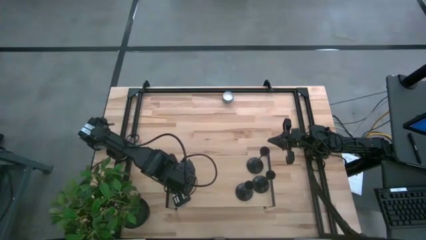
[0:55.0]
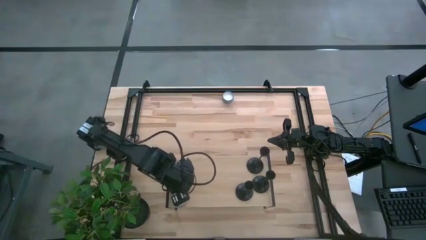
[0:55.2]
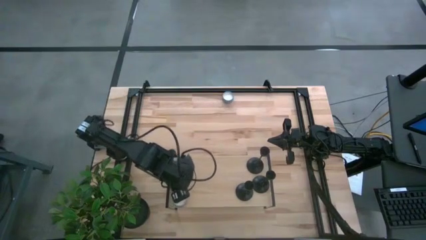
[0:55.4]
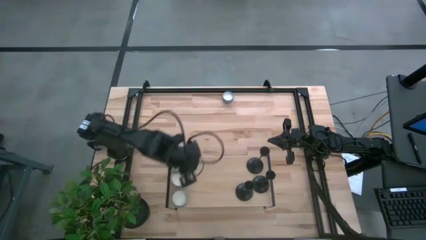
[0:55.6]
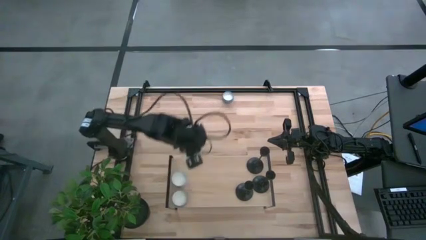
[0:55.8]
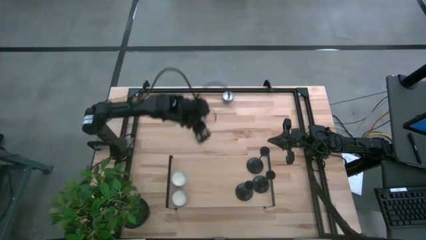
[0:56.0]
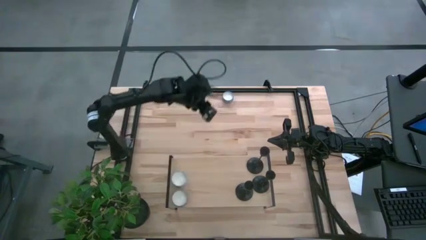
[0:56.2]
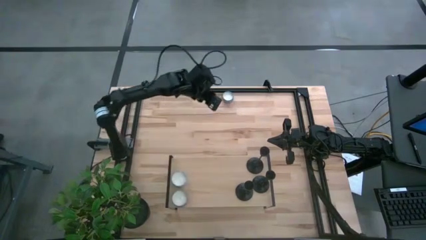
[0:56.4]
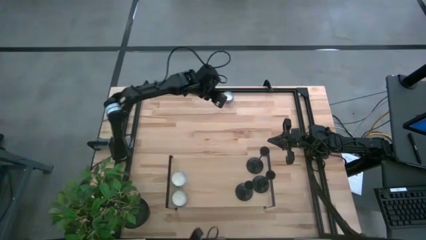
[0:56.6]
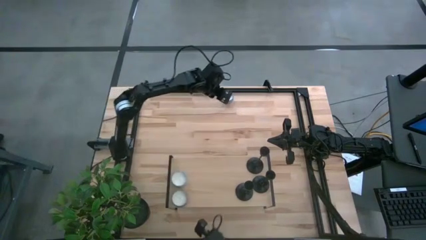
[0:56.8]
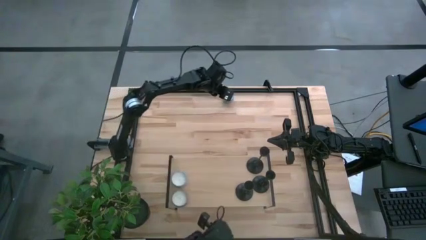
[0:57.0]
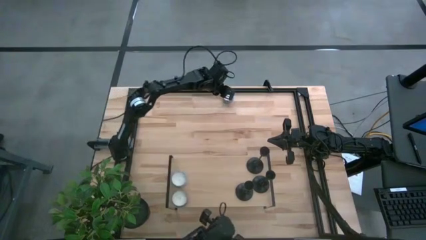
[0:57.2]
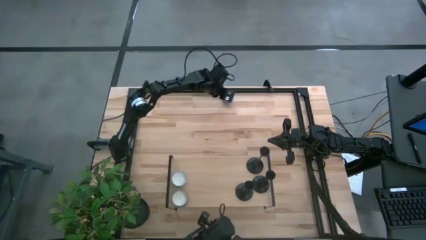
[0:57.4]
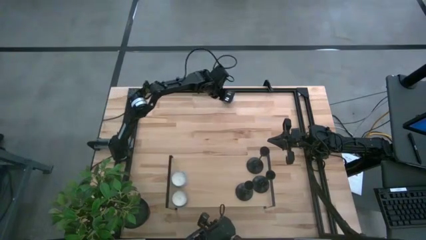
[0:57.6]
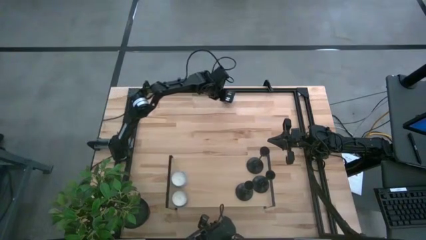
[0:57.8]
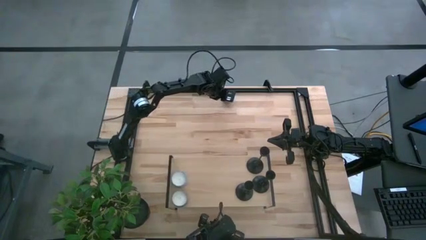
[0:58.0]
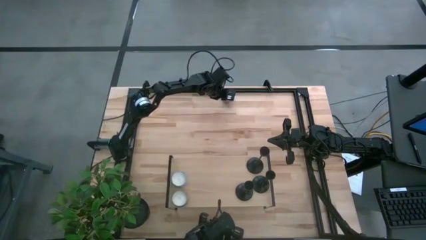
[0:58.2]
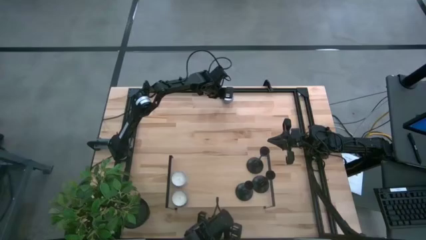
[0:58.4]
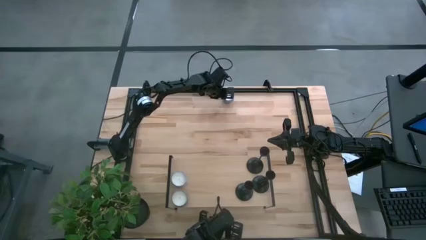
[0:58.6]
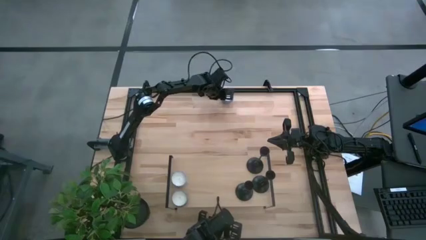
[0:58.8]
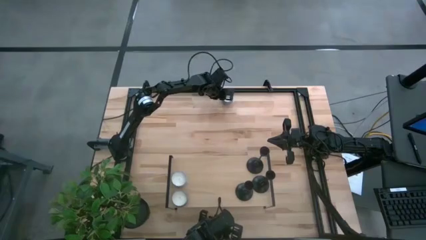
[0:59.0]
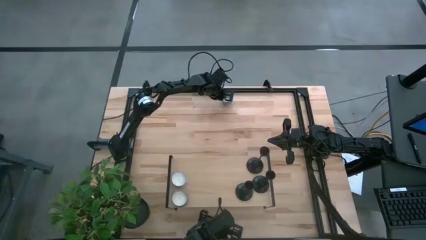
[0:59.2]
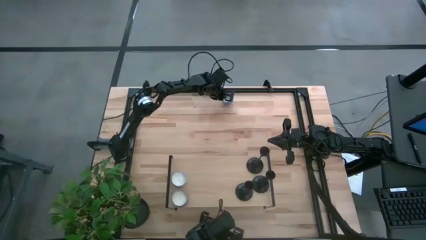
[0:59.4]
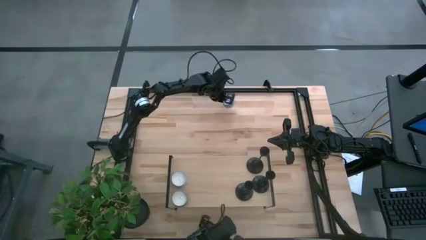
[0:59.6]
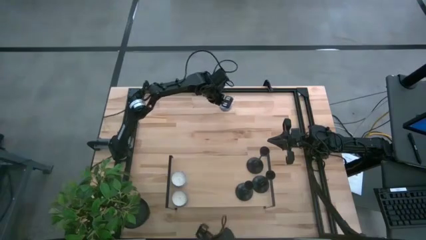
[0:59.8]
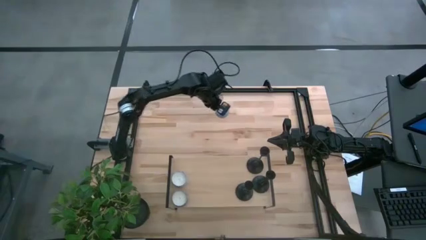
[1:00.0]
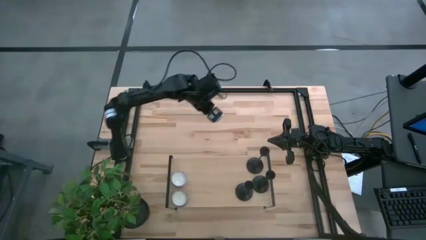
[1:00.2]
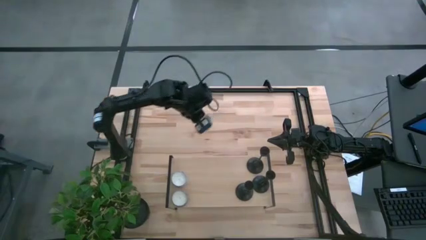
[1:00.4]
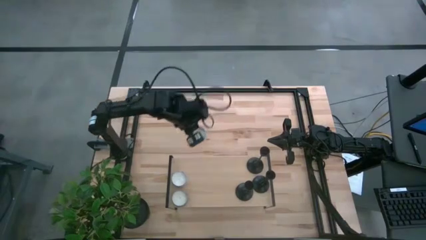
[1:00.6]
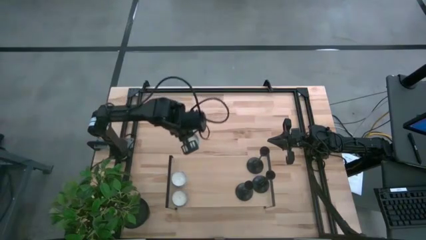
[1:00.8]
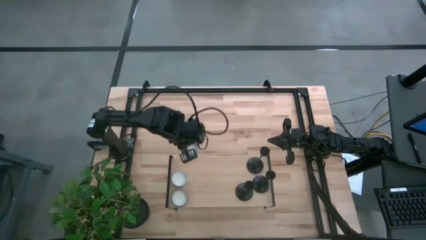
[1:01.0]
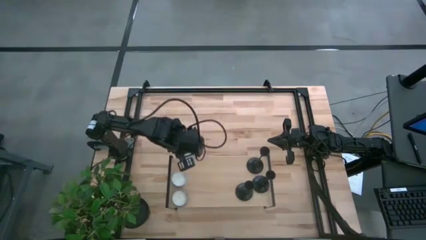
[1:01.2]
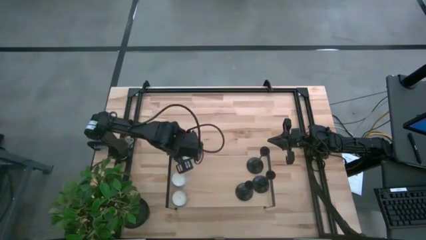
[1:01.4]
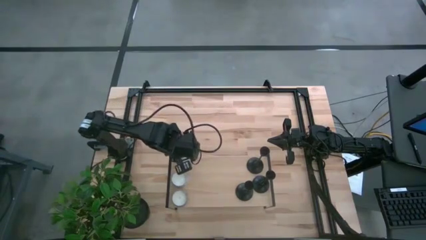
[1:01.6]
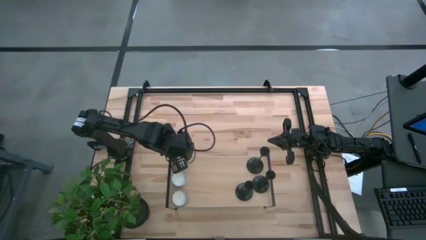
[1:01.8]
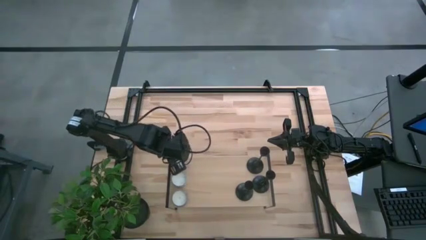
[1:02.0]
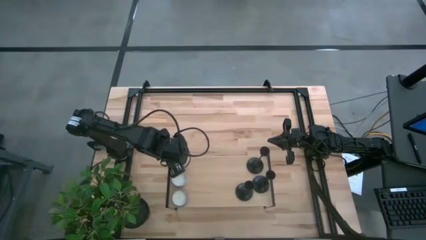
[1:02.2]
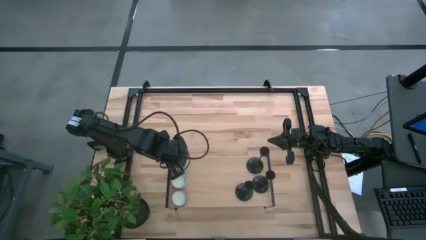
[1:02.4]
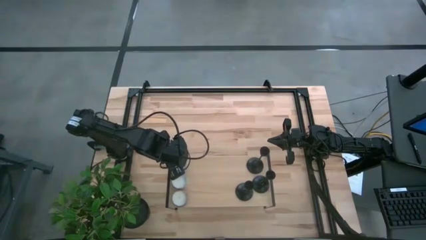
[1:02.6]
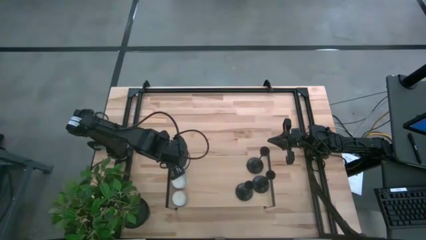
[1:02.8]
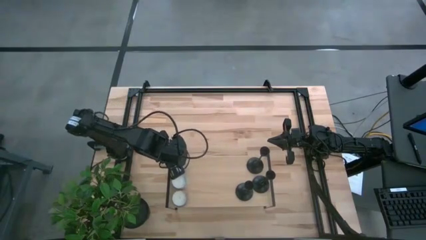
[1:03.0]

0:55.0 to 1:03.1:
Task: Pick & Place candle stick holders
Put the blue scented candle on the shelf aligned with the white scented candle

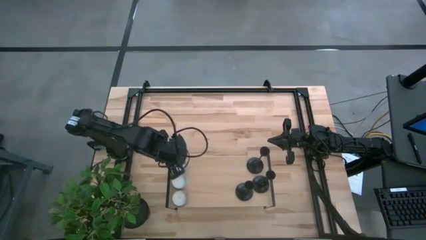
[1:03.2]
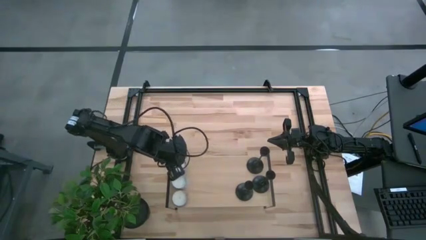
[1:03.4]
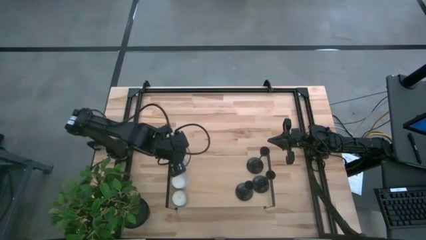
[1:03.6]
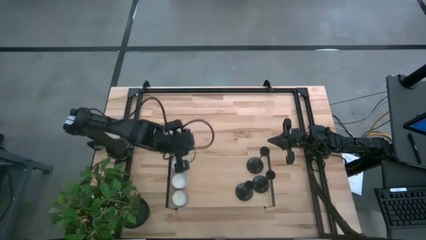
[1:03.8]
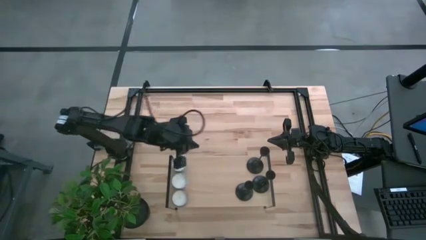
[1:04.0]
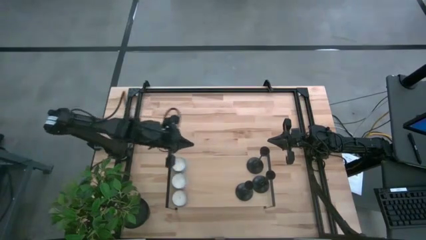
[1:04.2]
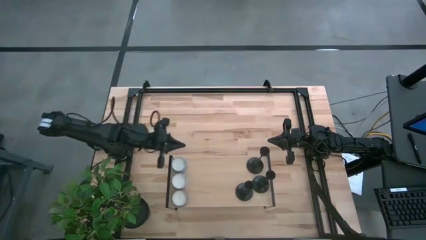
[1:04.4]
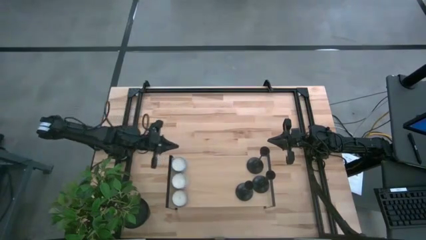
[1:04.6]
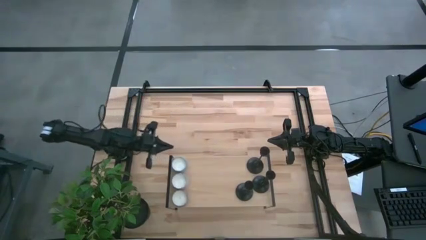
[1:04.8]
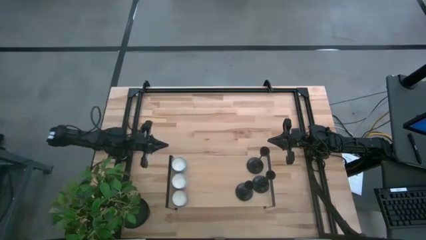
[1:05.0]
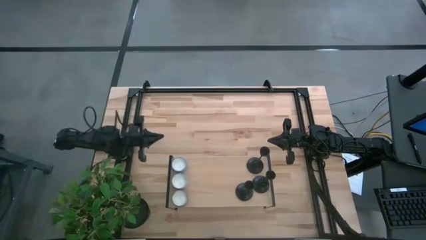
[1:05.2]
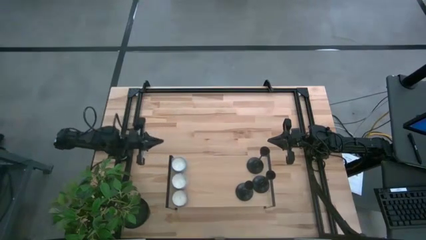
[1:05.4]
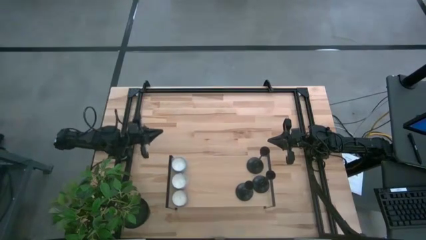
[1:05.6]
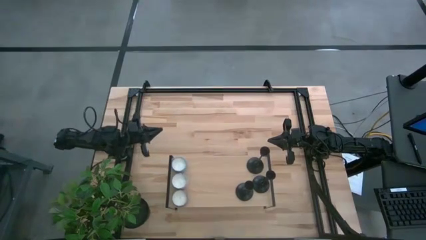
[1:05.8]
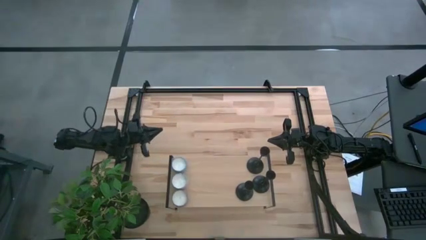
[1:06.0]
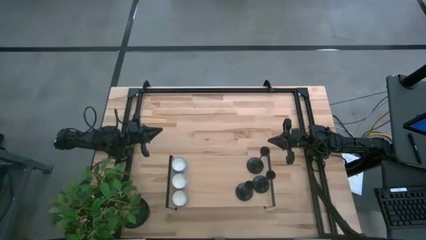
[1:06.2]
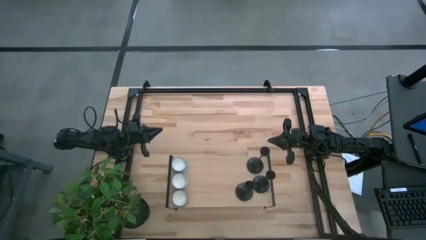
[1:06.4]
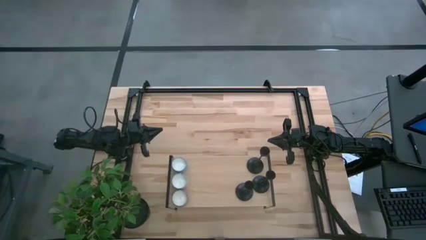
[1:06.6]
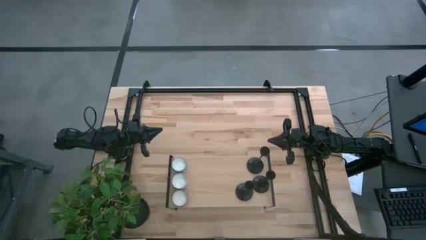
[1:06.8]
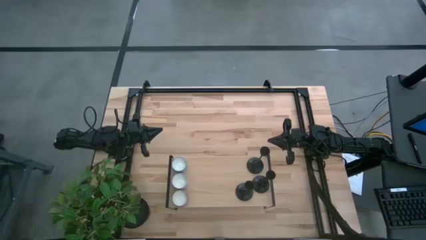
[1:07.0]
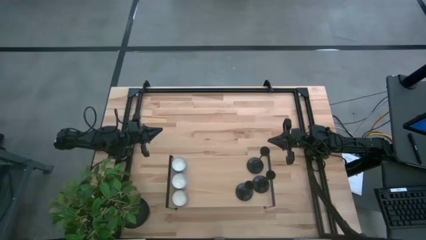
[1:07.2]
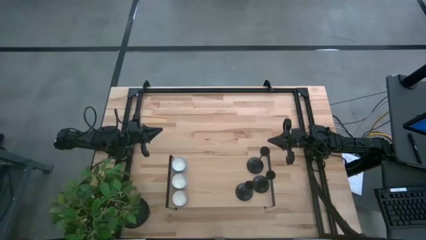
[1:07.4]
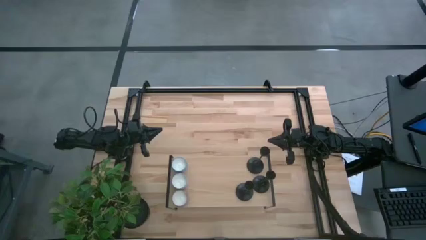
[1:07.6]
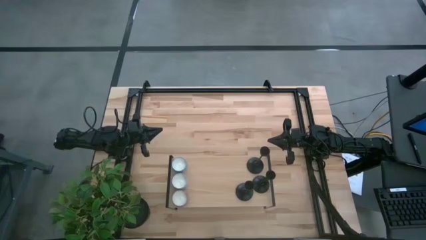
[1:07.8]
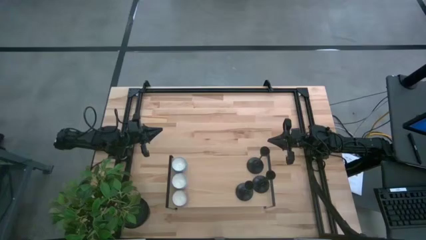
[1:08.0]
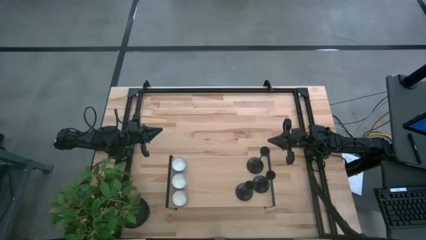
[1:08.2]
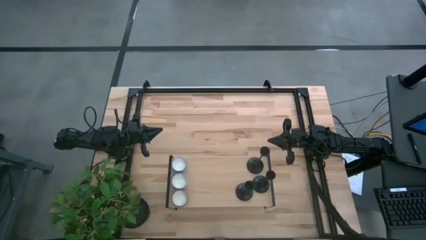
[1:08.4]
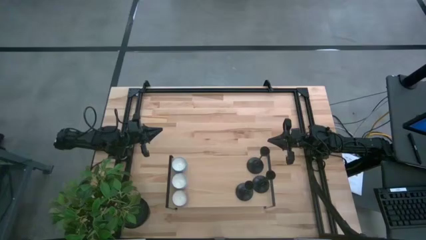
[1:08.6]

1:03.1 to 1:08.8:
Return to Home Position

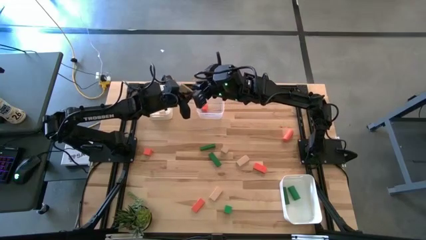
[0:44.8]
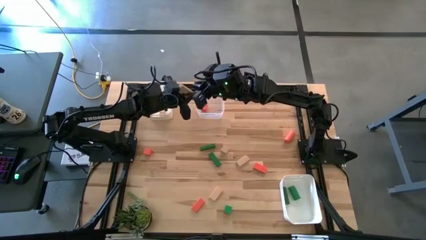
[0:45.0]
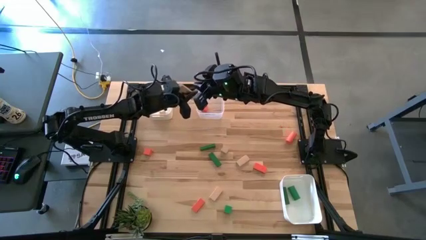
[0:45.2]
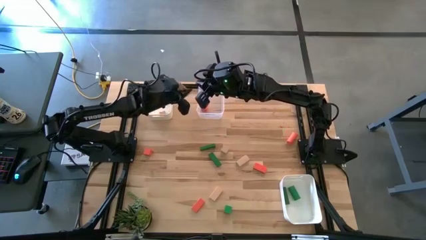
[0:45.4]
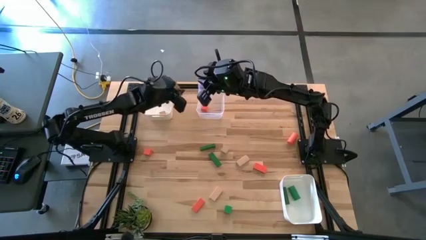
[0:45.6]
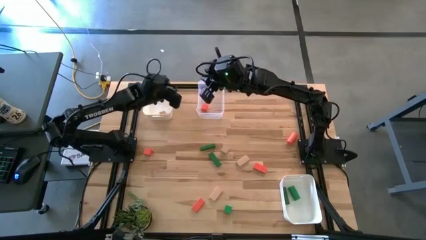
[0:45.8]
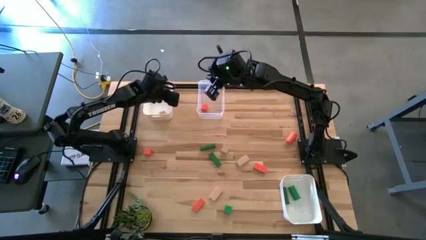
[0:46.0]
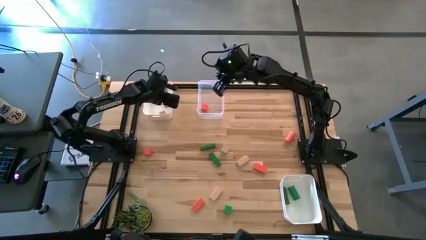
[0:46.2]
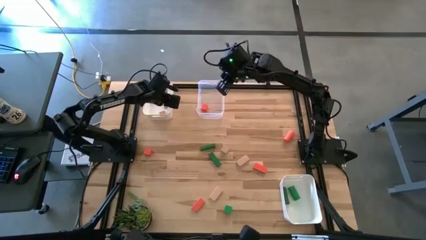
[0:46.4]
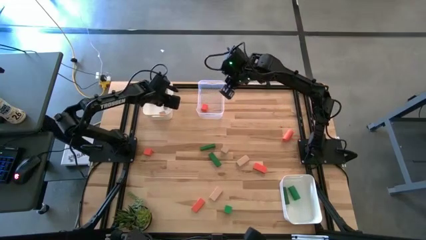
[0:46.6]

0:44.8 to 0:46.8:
Task: Sort & place blocks by color
Put the brown block into the top white bin
